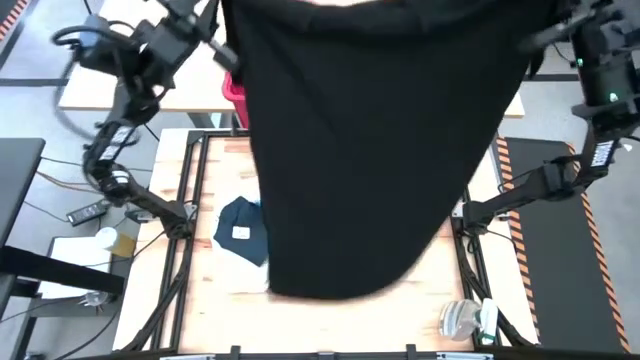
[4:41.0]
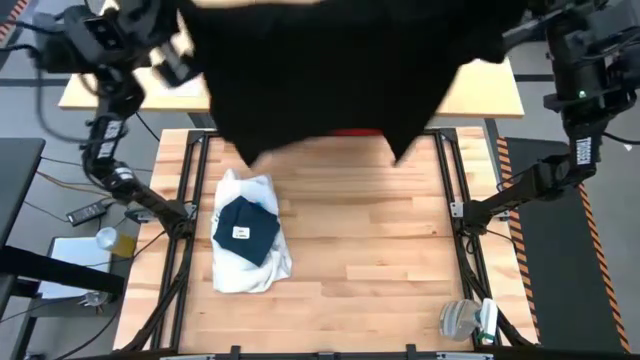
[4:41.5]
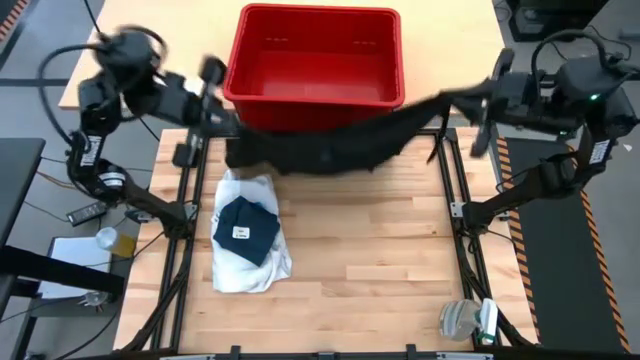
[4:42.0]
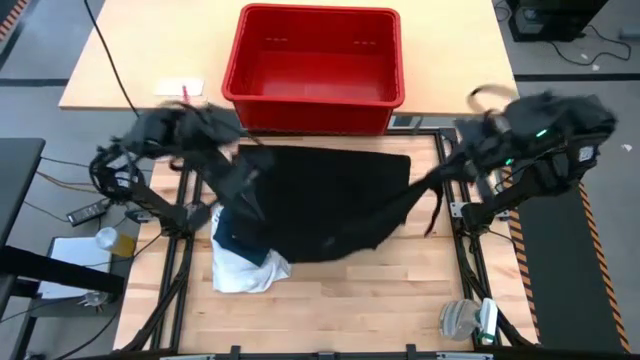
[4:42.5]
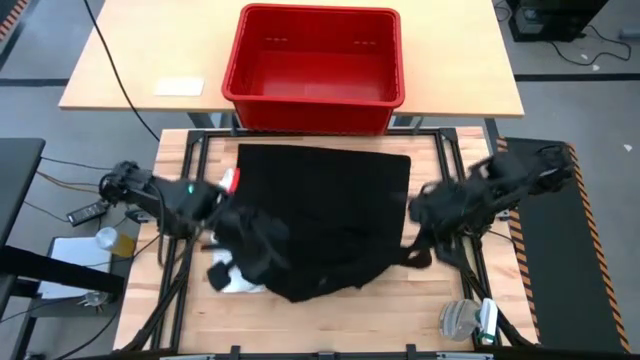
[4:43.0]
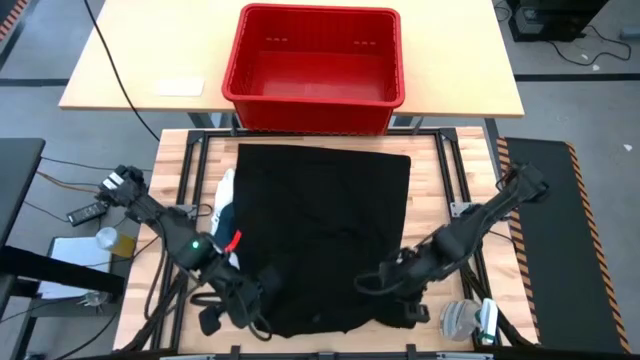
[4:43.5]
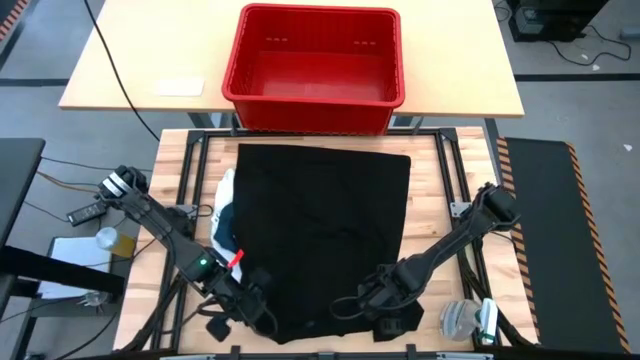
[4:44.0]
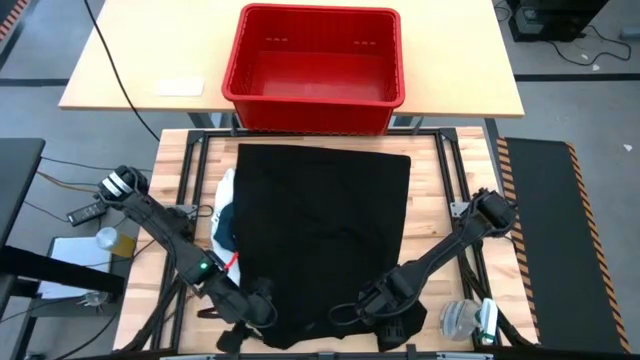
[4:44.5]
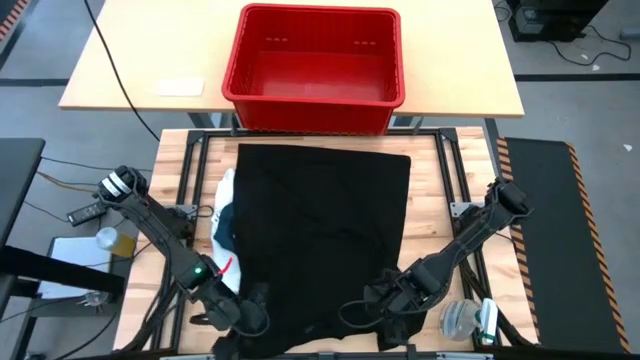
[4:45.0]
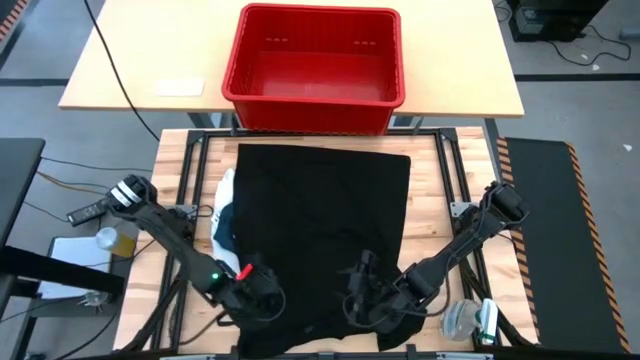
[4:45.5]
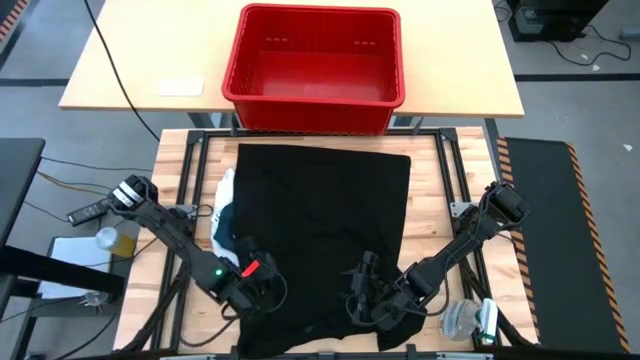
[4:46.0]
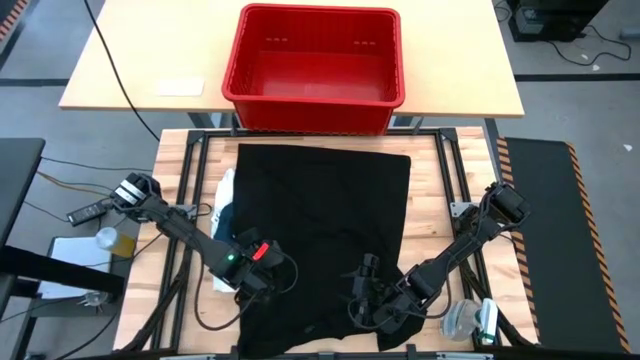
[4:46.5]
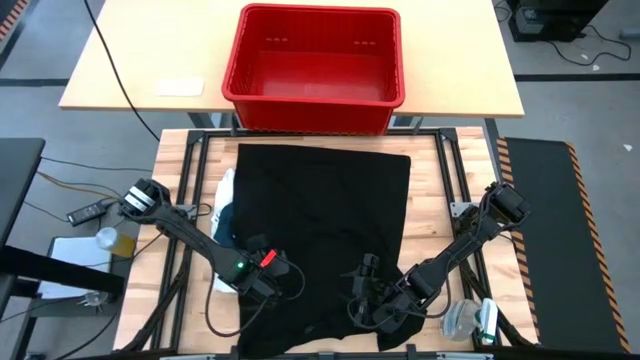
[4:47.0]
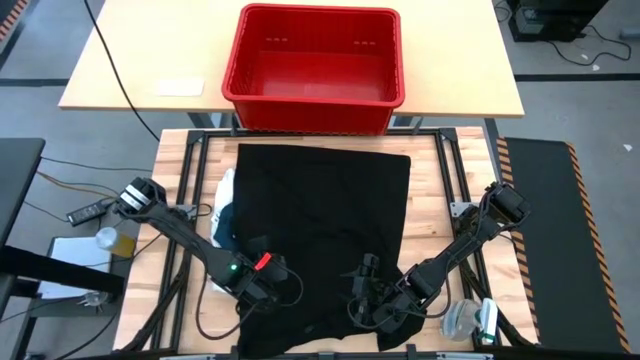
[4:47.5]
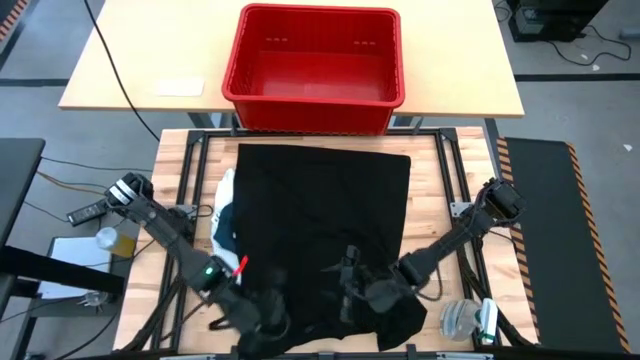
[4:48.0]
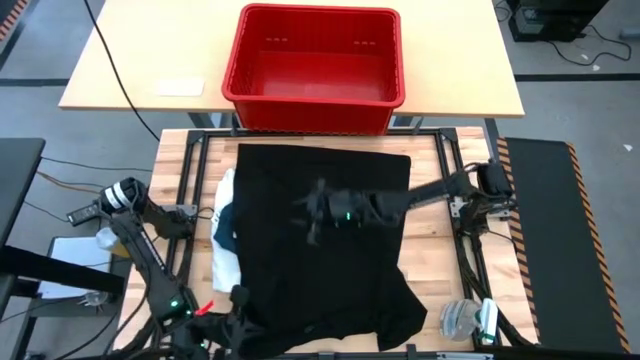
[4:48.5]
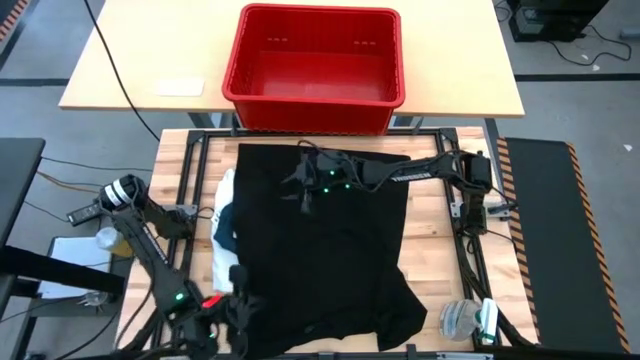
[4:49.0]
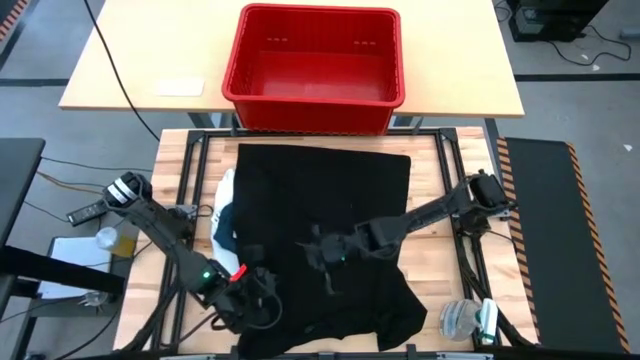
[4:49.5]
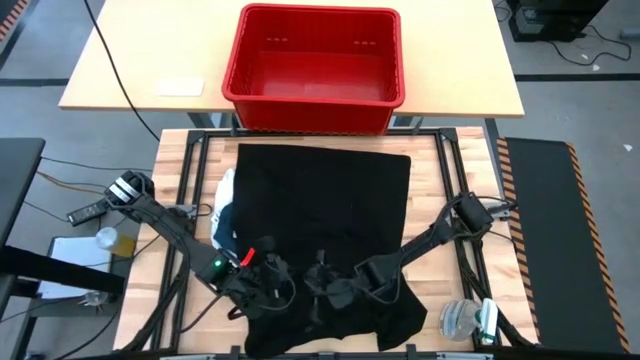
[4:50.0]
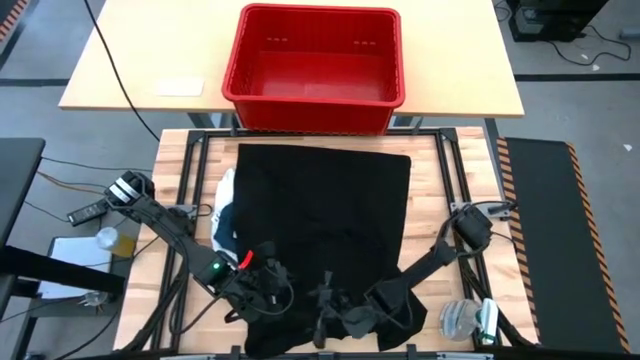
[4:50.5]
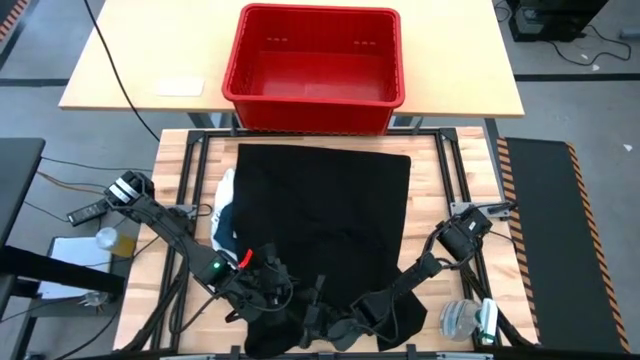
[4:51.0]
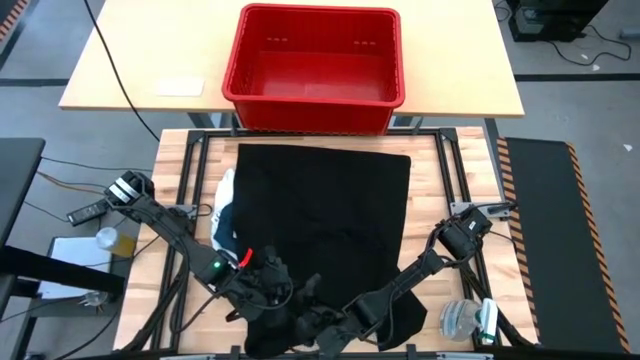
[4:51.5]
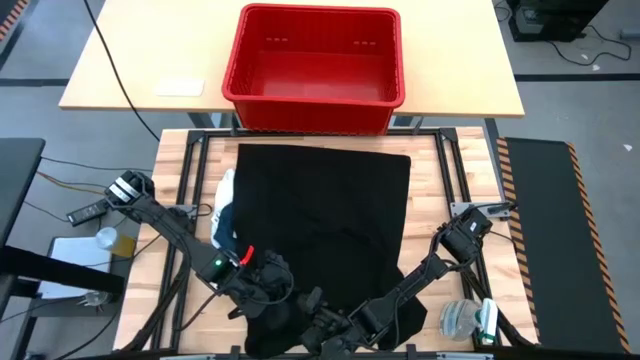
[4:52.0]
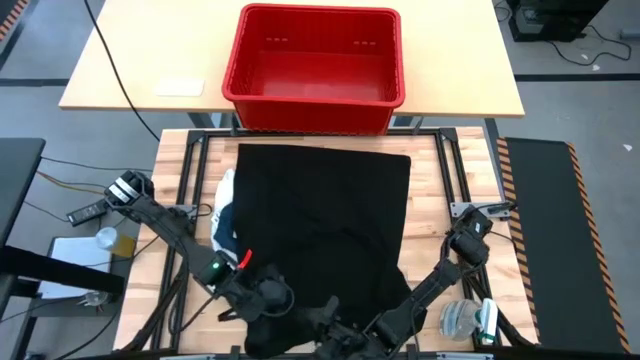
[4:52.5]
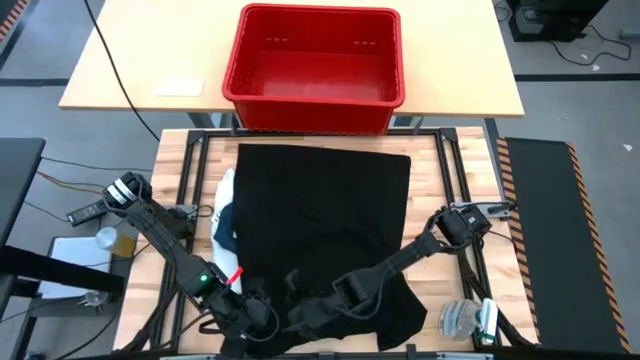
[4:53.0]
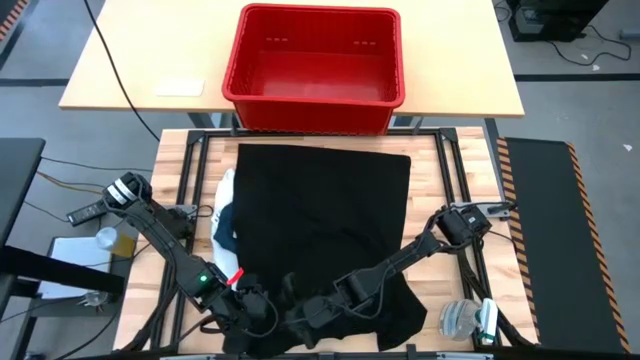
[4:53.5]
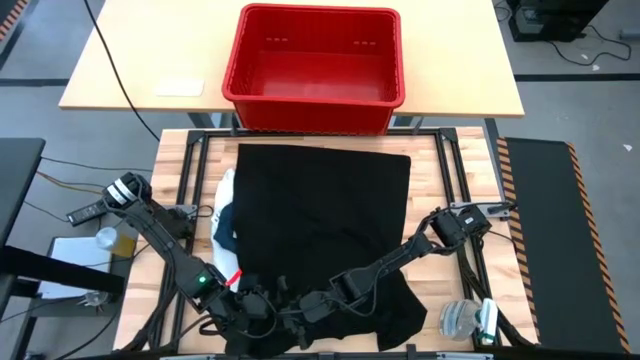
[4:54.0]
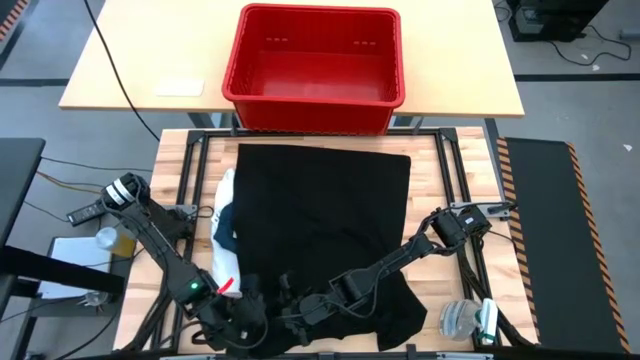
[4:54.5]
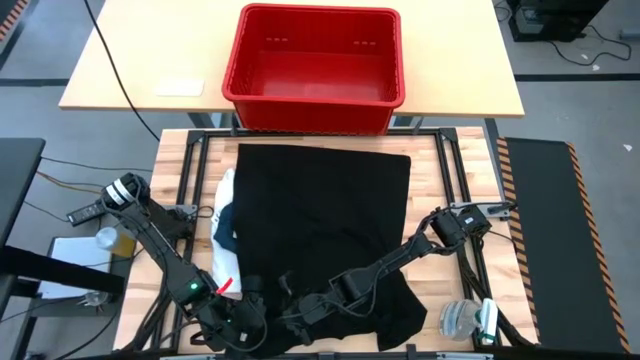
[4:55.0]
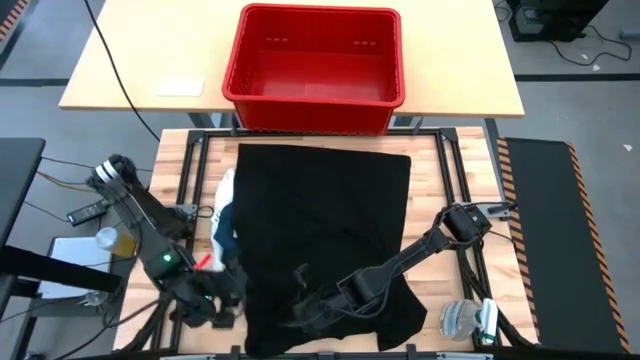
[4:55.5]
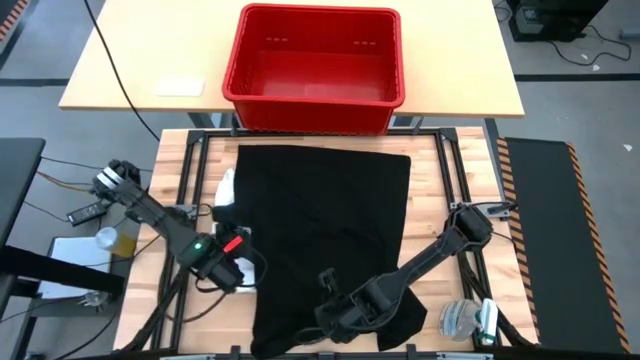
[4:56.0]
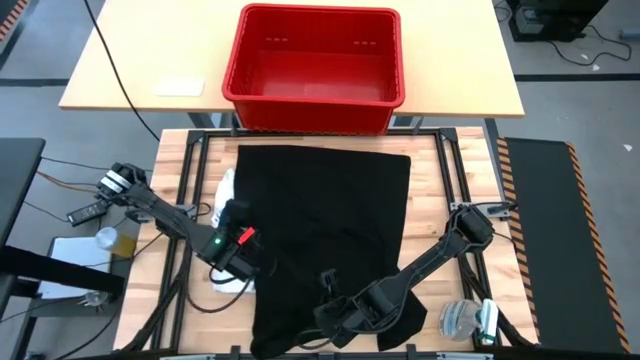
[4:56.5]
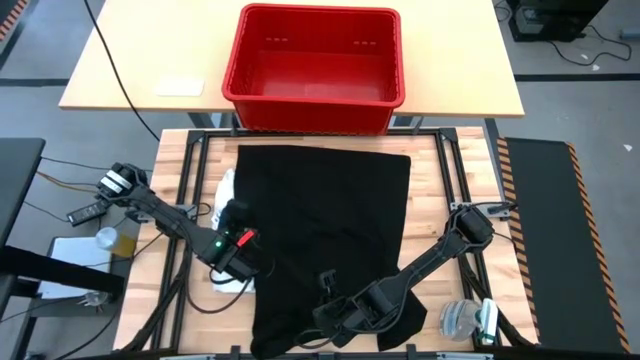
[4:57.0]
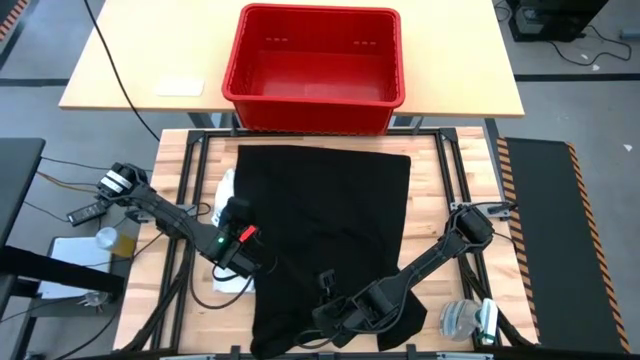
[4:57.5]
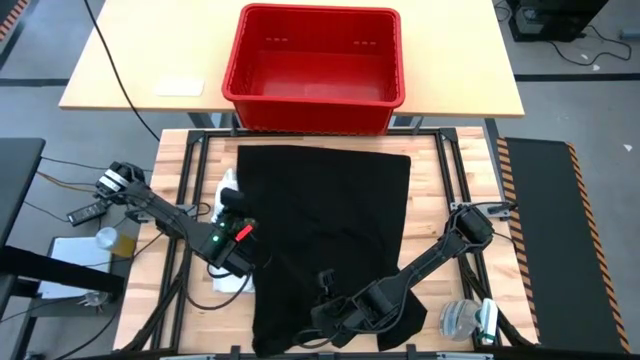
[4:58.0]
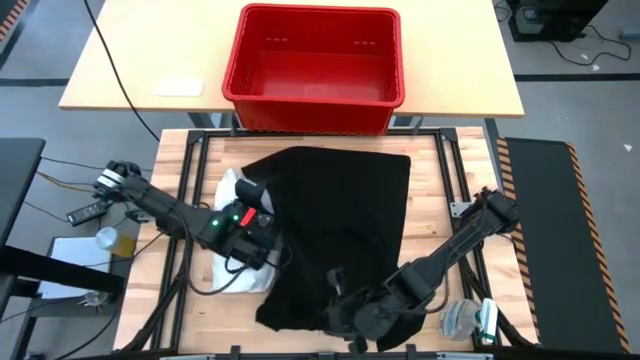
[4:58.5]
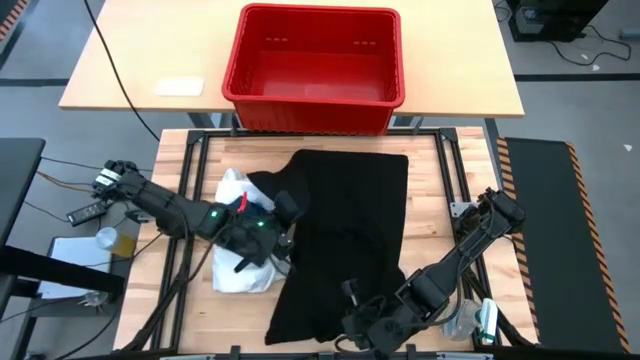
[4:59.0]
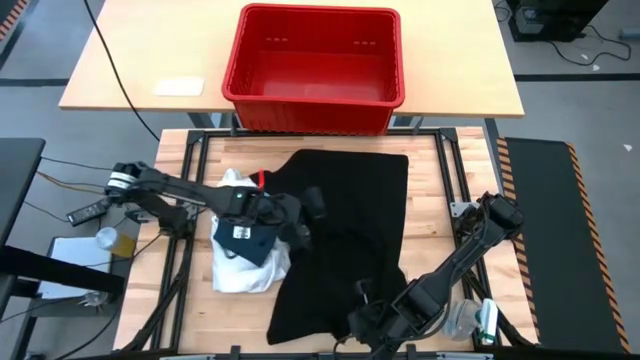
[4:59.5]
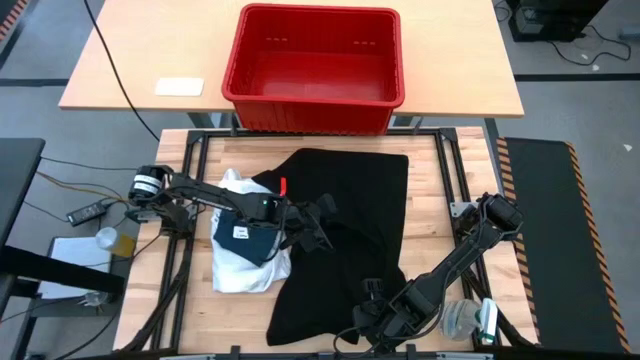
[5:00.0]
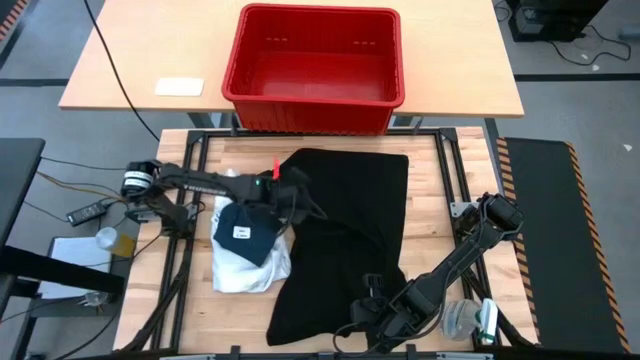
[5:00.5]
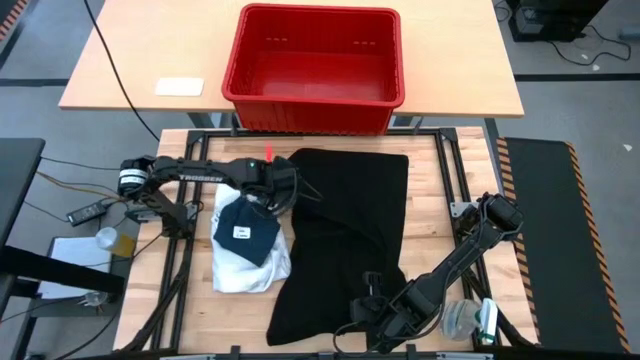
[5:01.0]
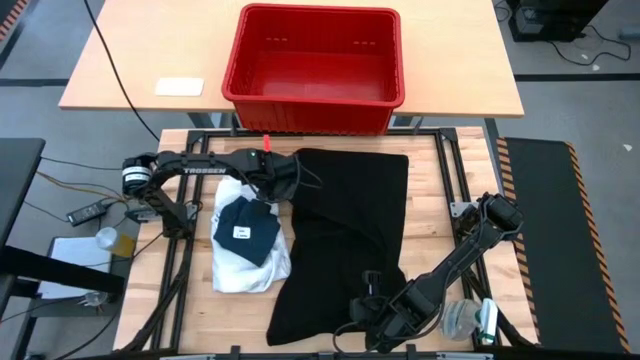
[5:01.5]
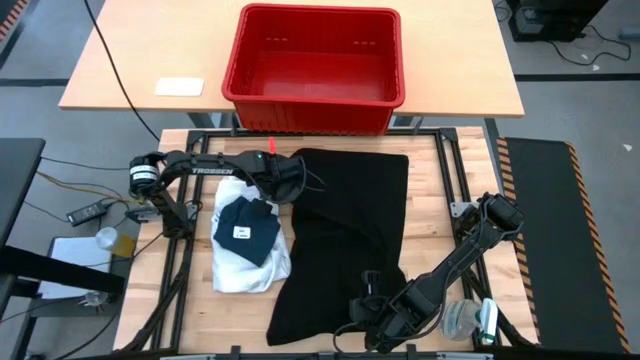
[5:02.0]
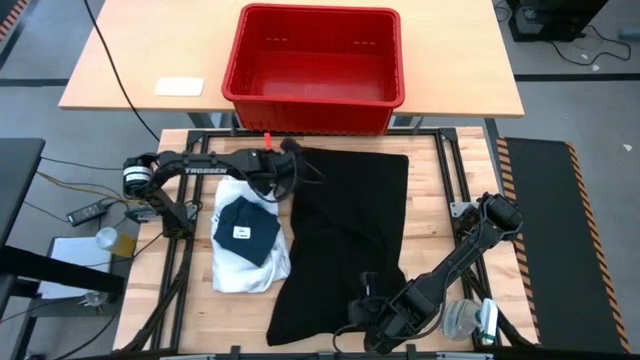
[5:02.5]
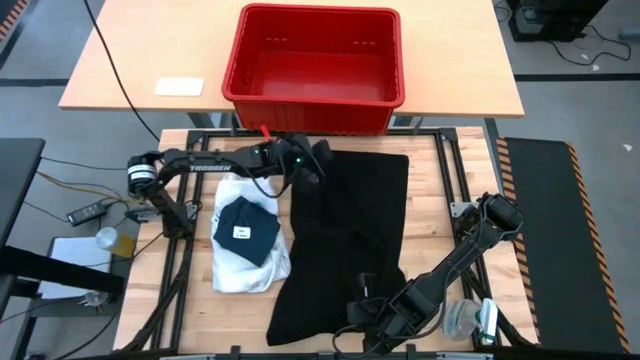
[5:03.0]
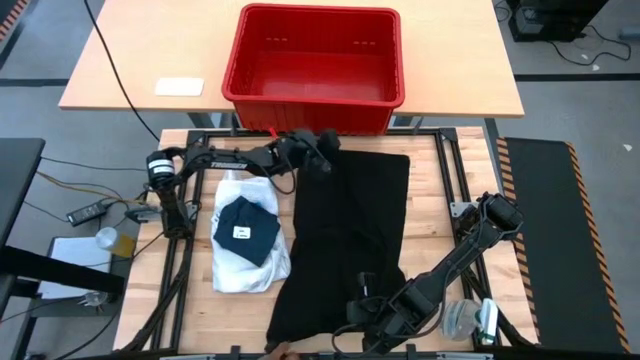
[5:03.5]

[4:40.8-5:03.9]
Task: Fold laundry
Fold the black shirt
